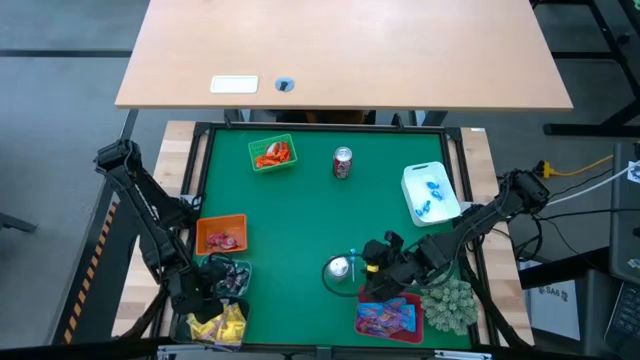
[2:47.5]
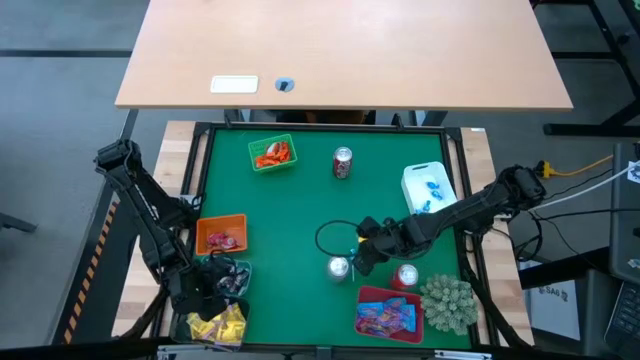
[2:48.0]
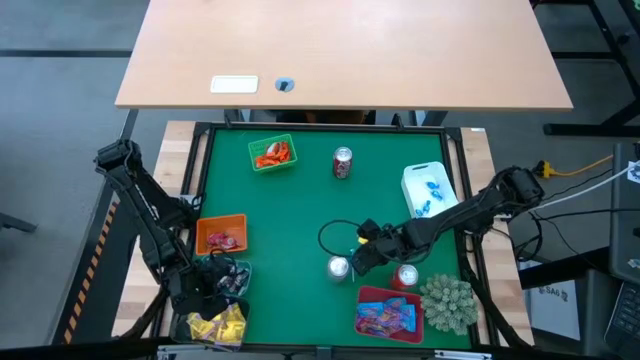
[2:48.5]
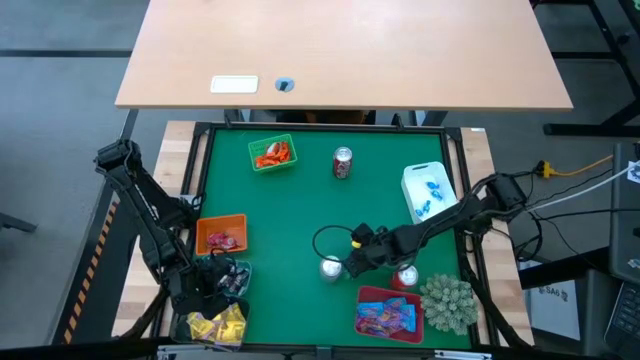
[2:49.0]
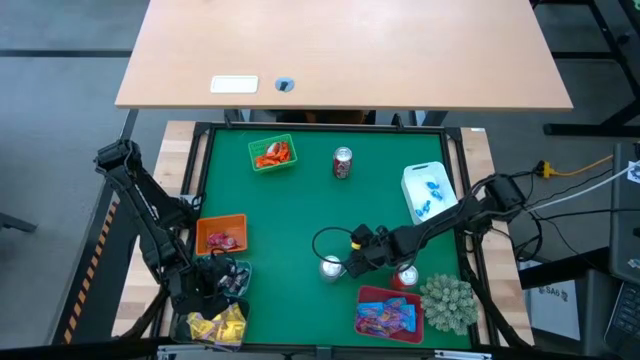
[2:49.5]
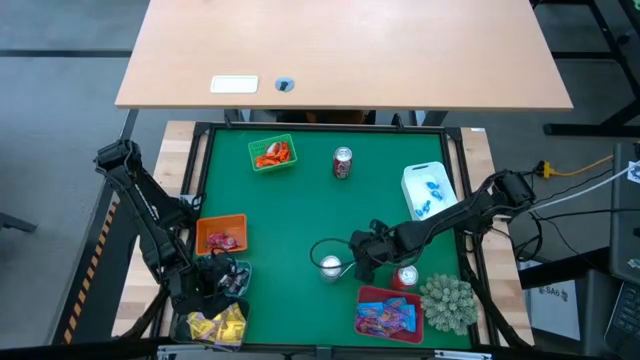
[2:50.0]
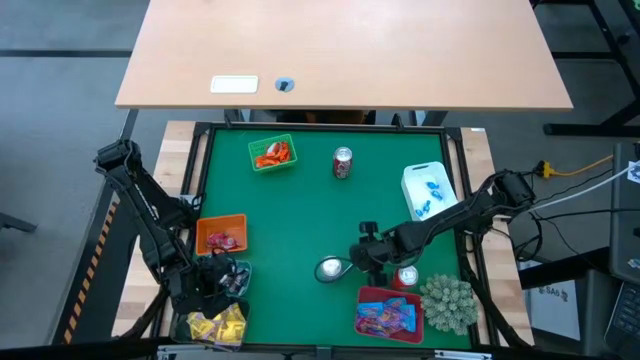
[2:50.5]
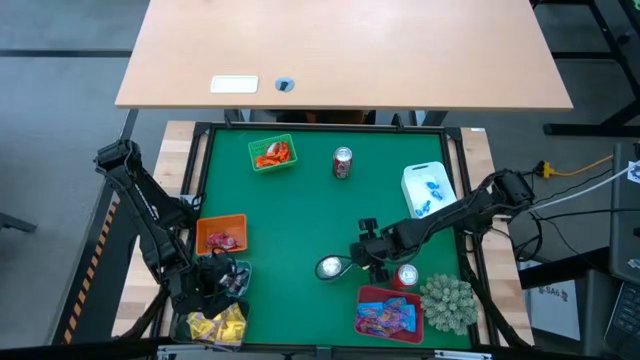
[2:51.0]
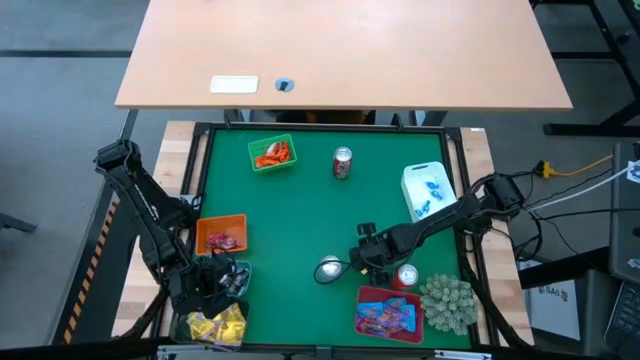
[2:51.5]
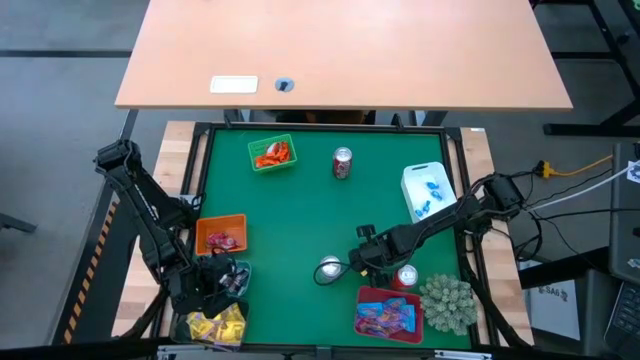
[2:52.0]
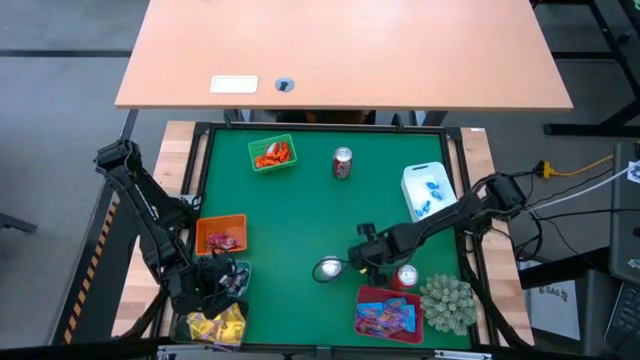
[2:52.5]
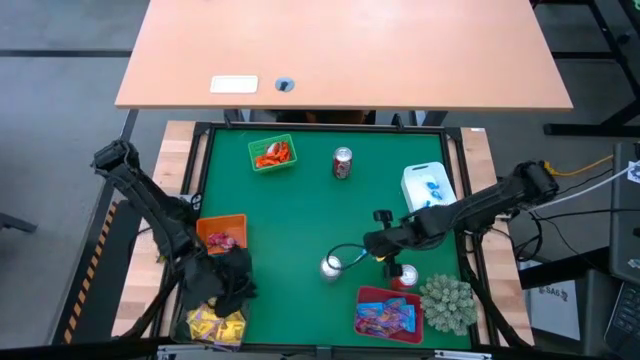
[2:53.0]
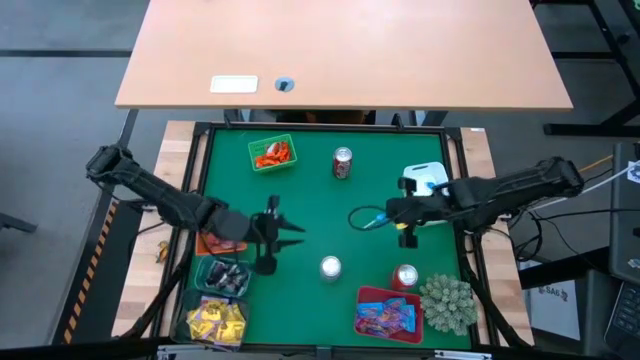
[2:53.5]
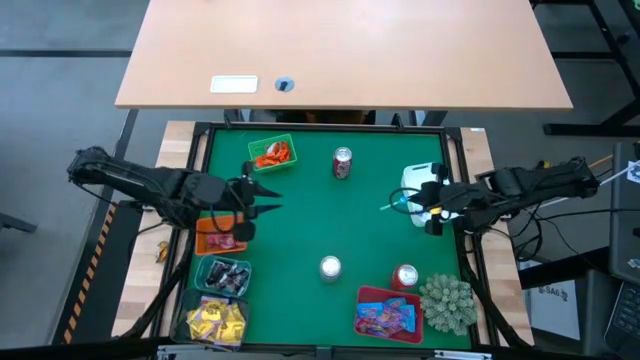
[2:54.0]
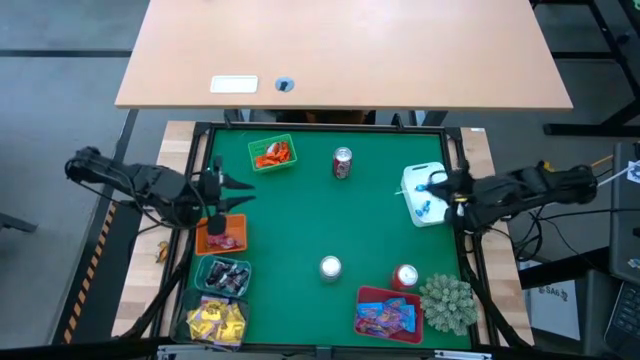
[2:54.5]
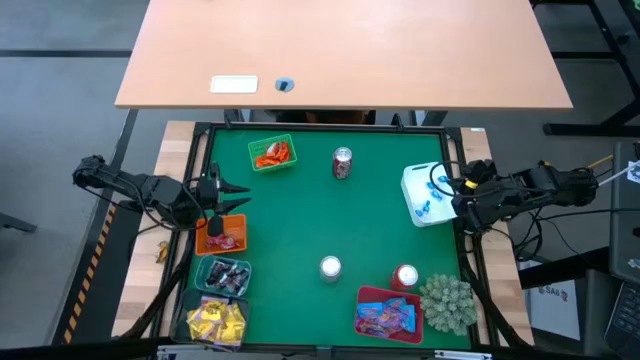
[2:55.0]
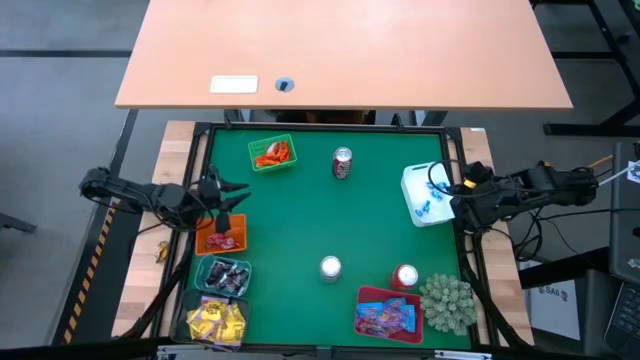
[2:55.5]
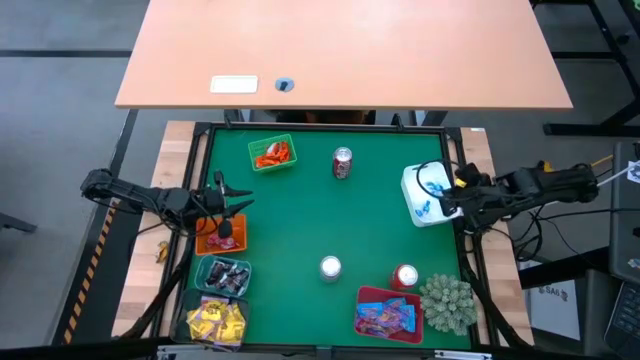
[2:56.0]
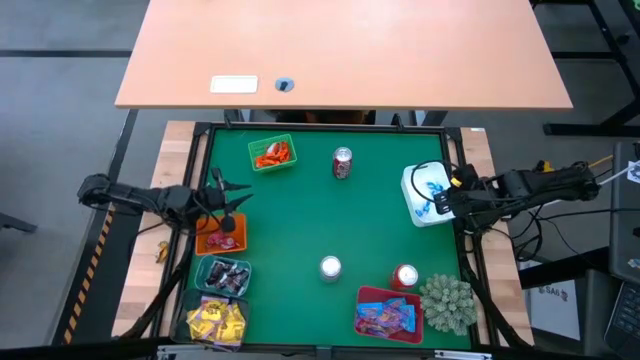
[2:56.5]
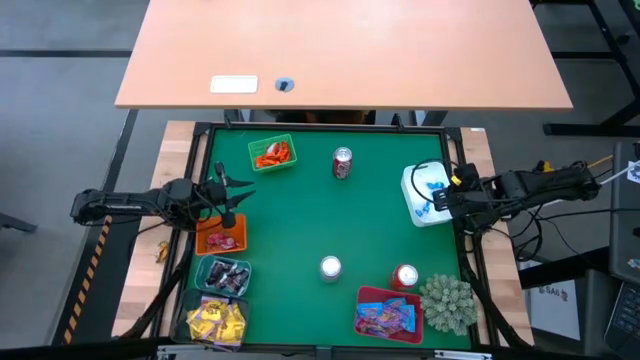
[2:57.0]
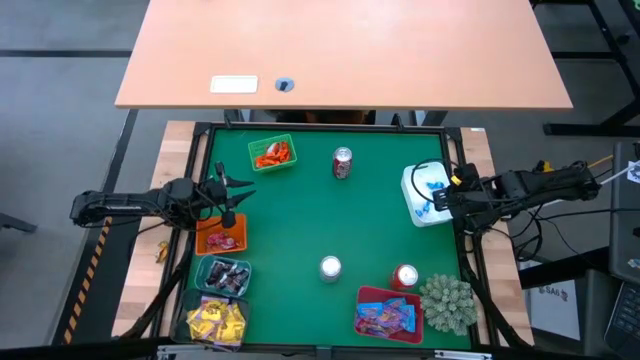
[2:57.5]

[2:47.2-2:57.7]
Task: Sort candy
Put the blue lollipop candy into the white bin

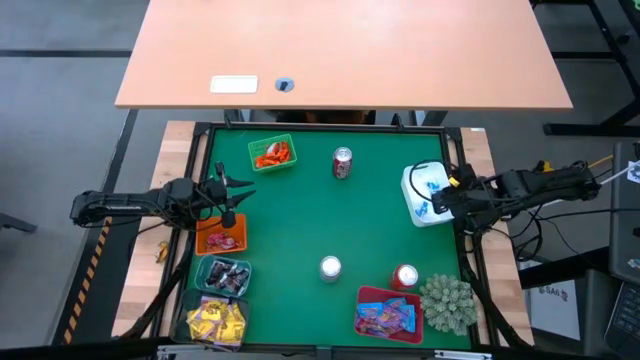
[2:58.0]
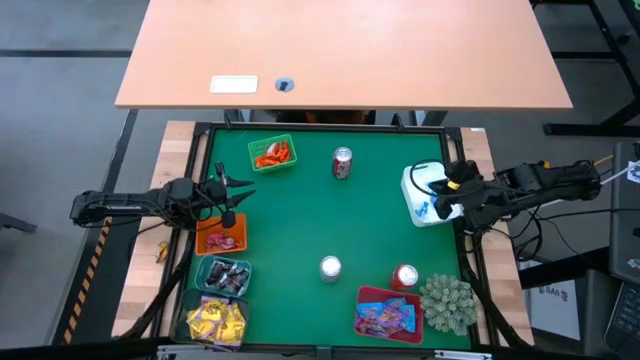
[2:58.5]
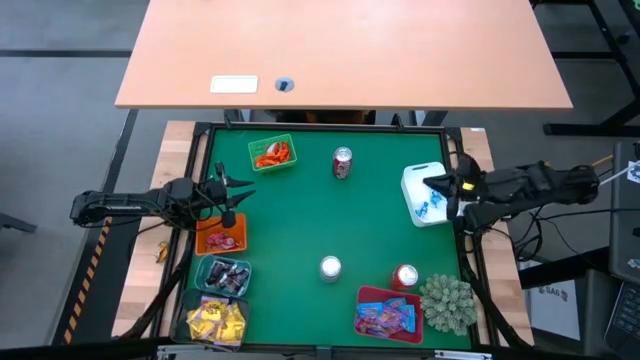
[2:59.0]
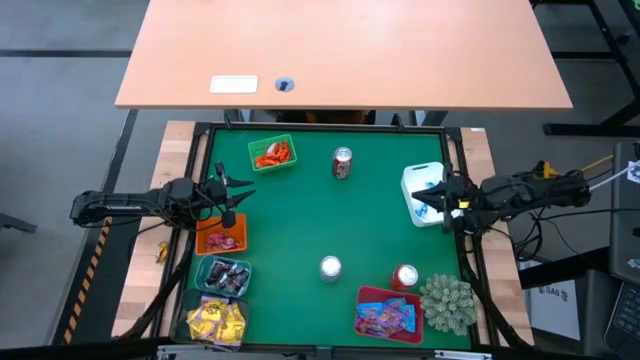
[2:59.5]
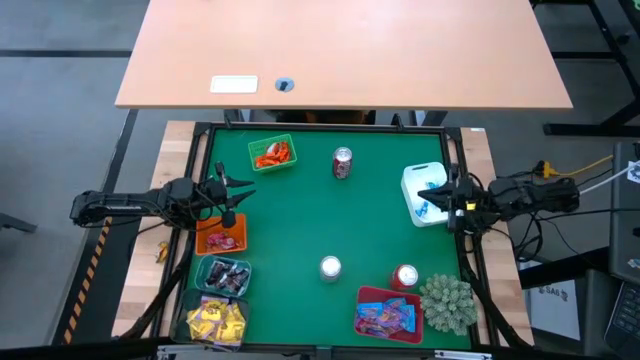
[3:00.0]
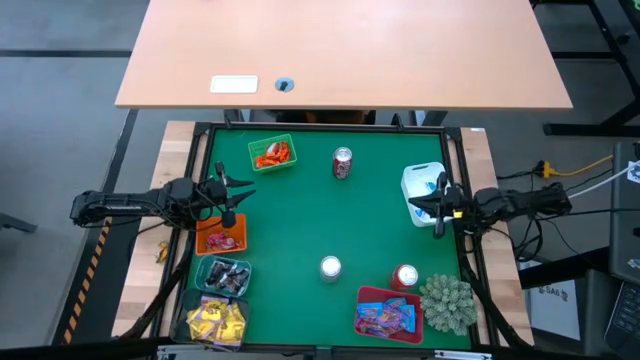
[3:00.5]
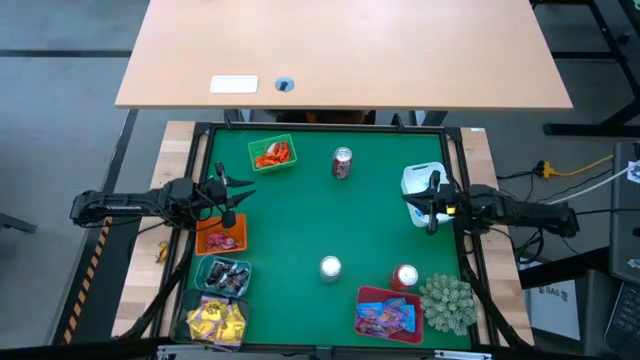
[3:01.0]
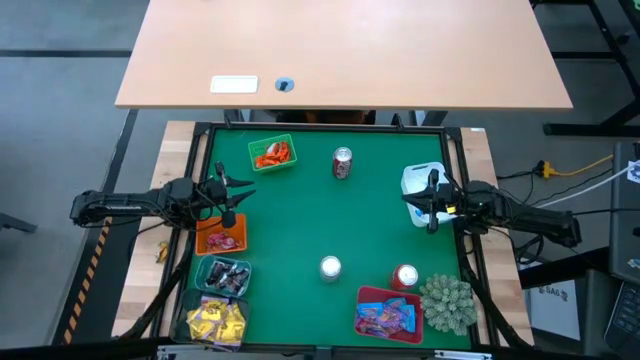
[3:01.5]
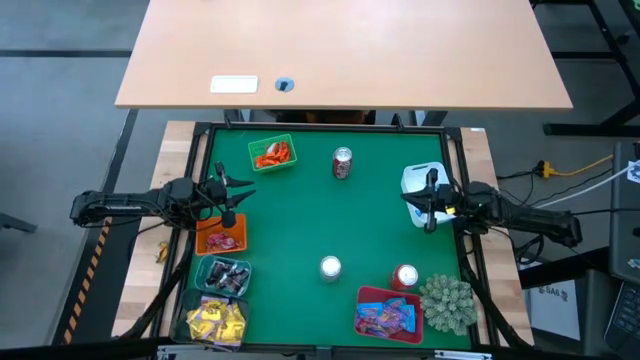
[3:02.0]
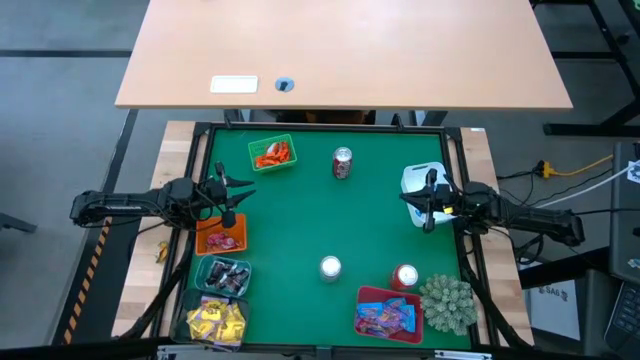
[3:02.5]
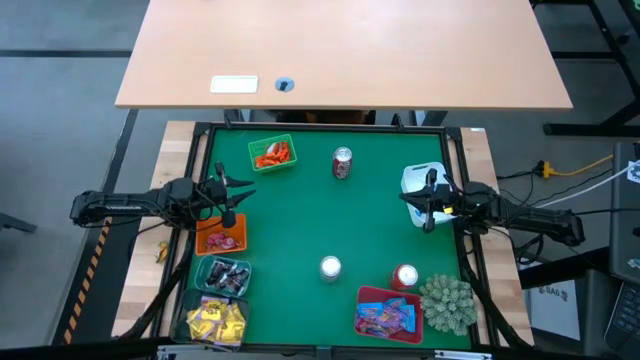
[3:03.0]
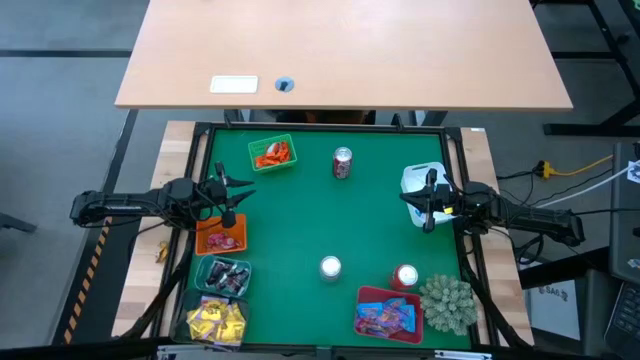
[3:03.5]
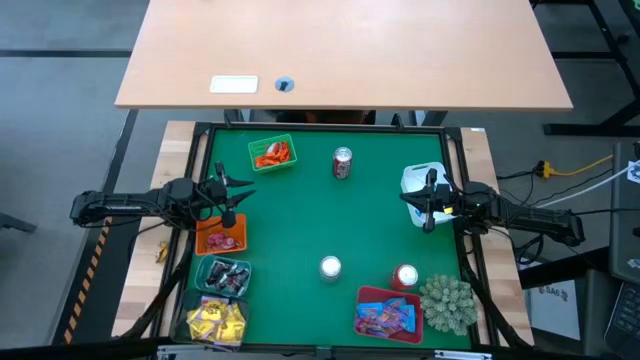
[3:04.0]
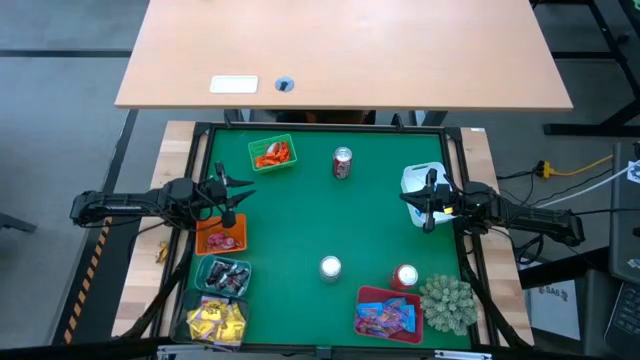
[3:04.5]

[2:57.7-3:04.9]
Return to Home Position

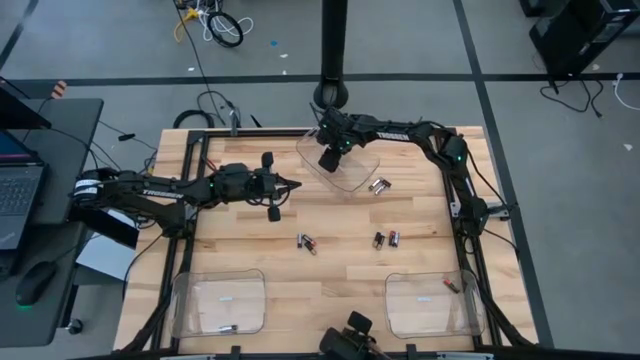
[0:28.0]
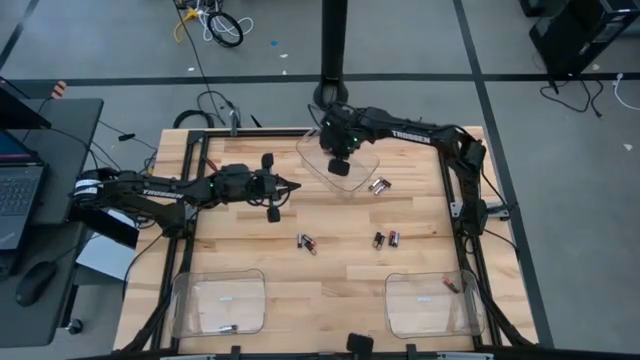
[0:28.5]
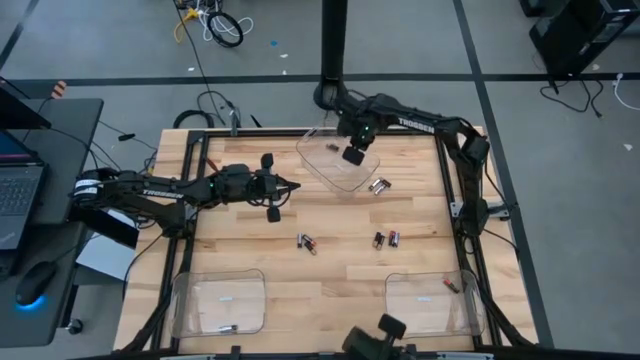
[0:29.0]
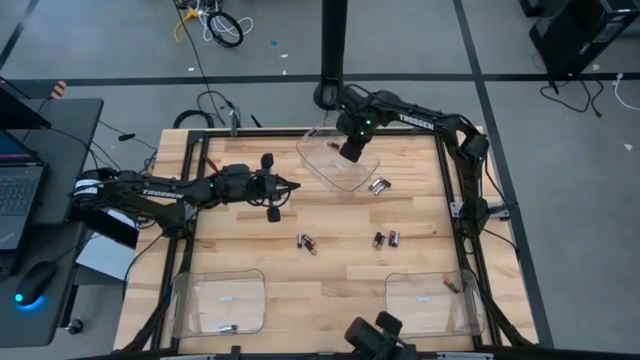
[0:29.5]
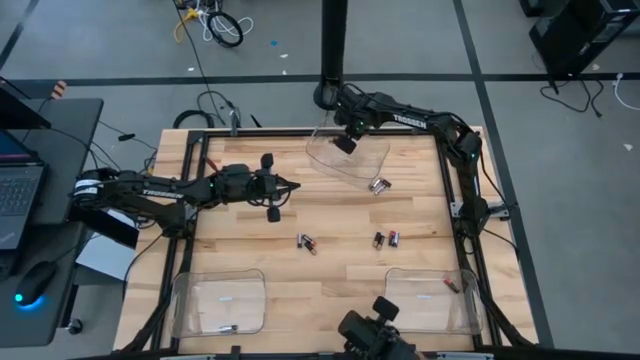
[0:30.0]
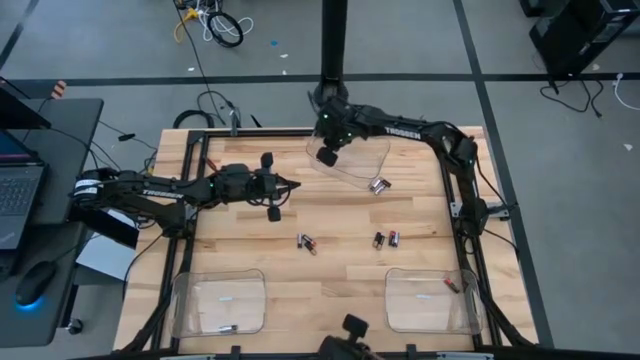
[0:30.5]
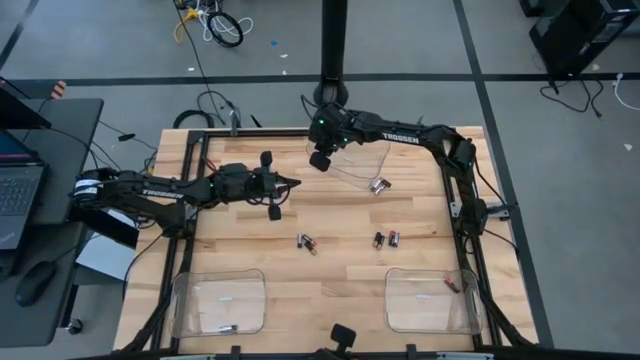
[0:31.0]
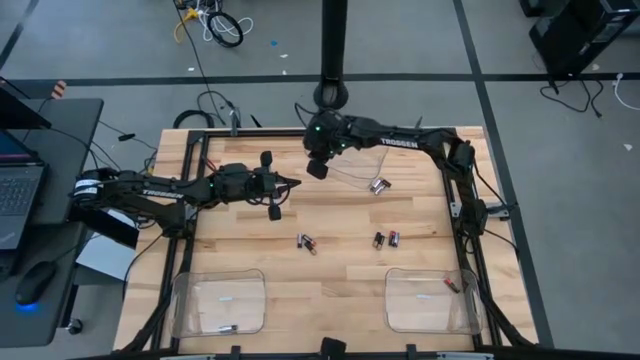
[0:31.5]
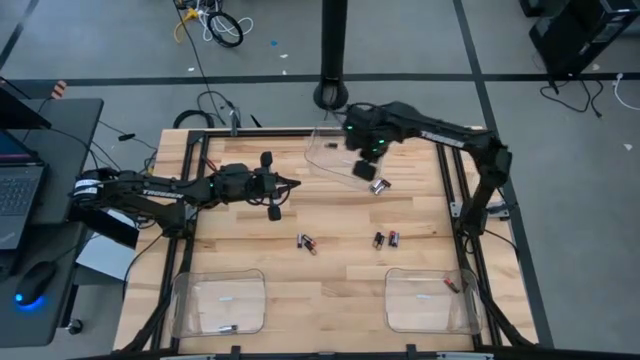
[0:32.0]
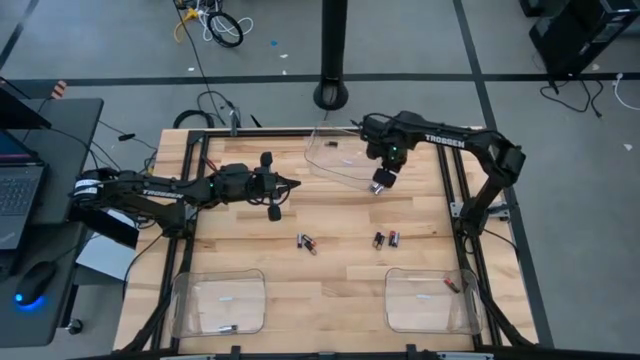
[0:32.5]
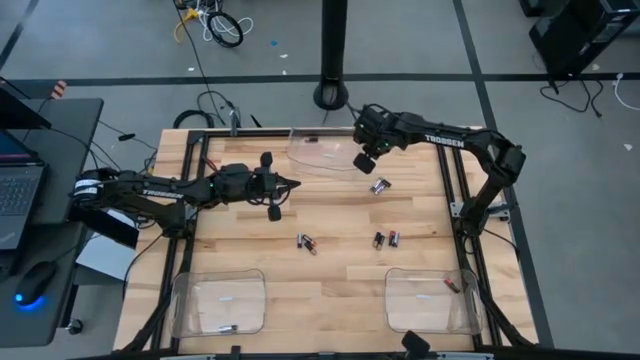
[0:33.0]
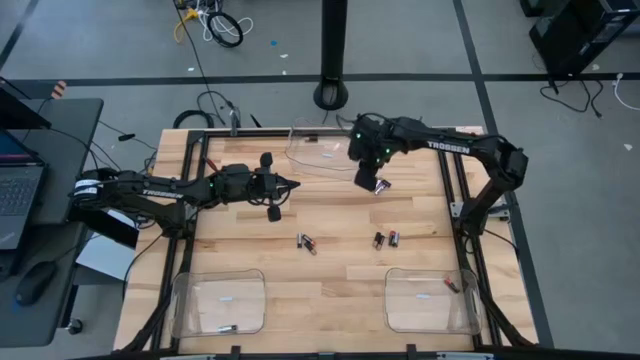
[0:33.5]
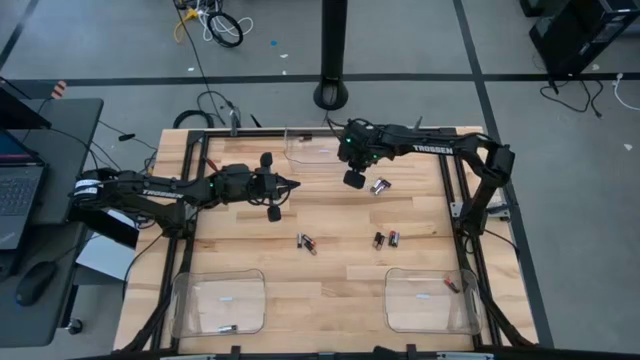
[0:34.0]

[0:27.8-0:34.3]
Task: Sort batteries
Adjust the top middle transparent bin
